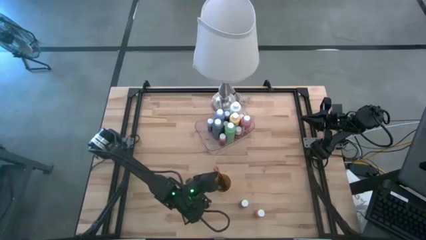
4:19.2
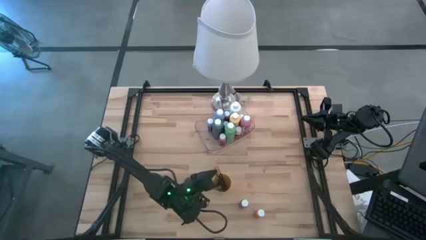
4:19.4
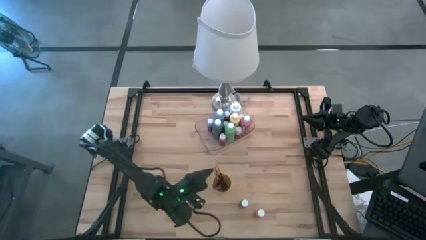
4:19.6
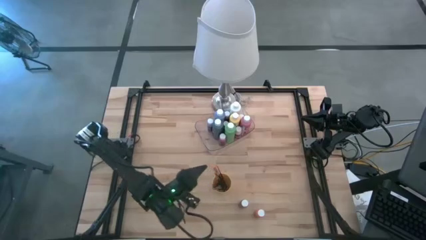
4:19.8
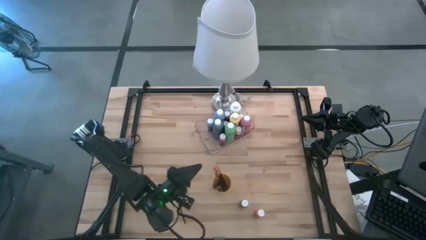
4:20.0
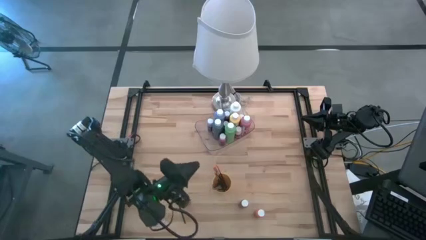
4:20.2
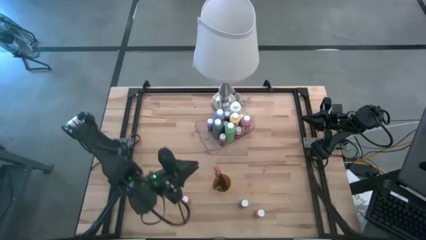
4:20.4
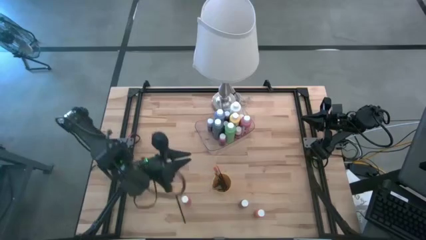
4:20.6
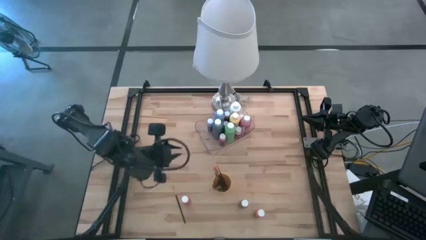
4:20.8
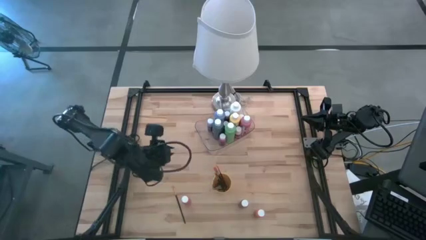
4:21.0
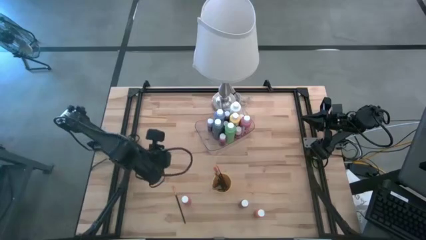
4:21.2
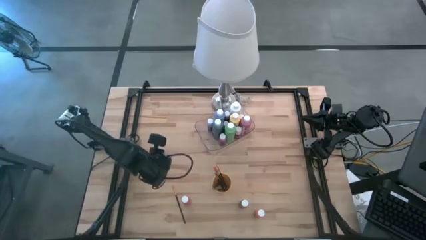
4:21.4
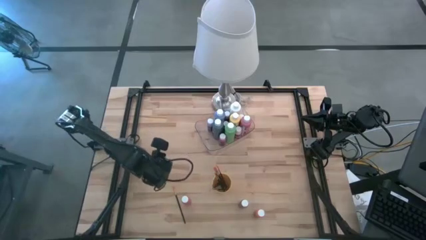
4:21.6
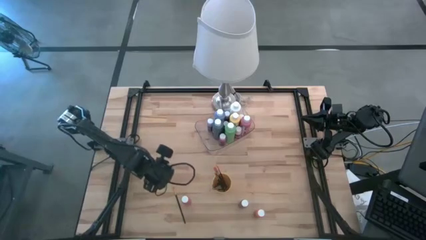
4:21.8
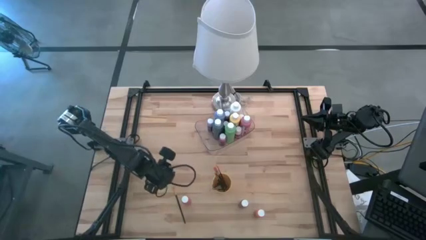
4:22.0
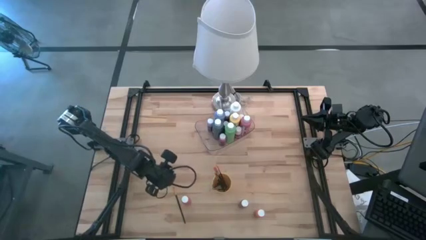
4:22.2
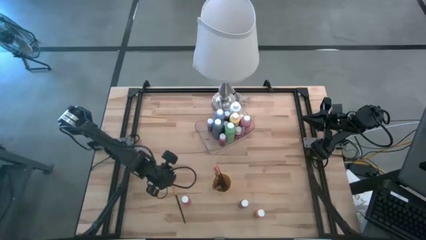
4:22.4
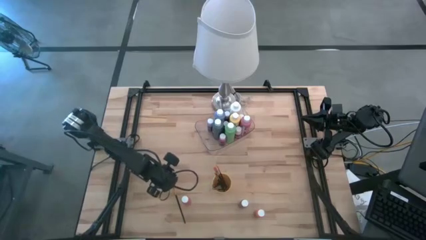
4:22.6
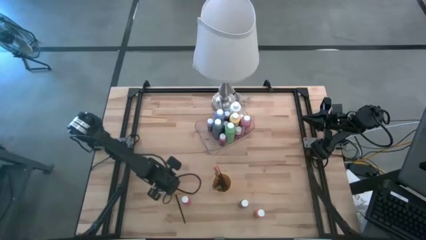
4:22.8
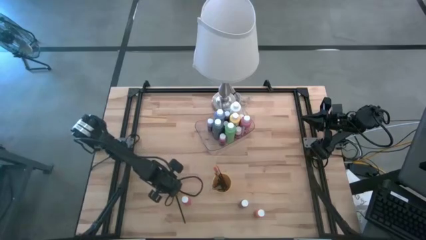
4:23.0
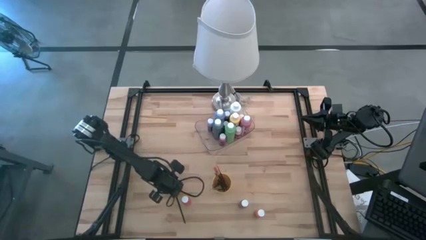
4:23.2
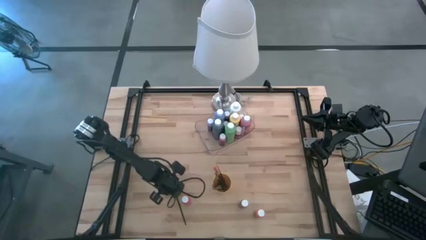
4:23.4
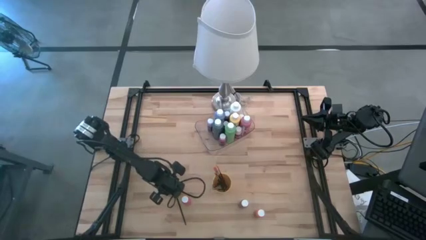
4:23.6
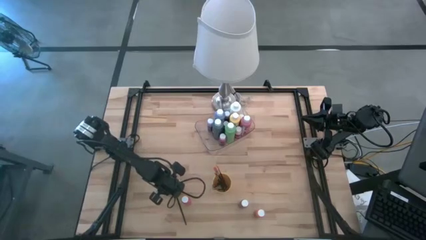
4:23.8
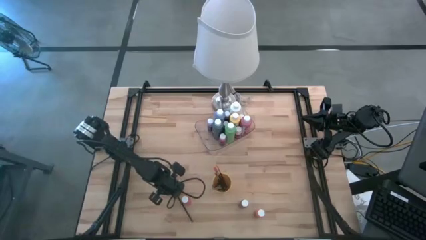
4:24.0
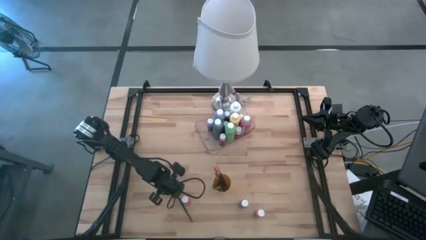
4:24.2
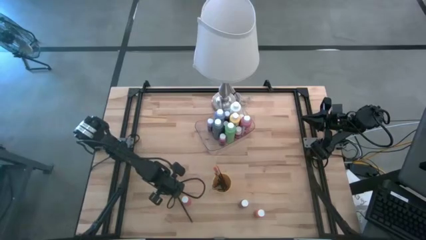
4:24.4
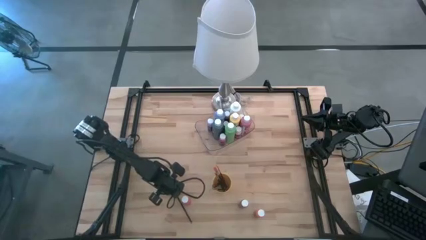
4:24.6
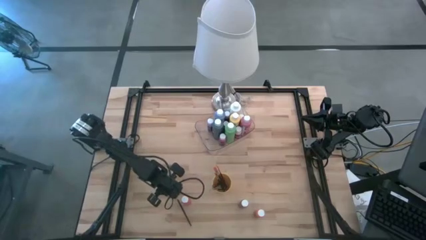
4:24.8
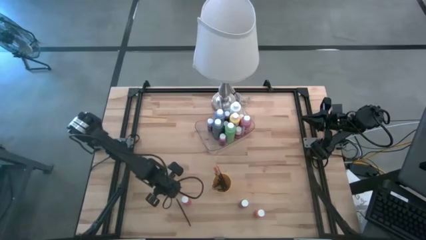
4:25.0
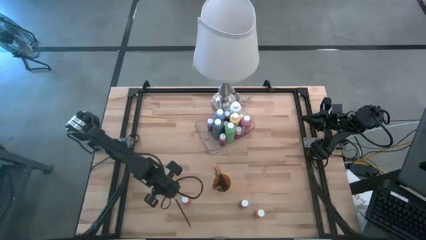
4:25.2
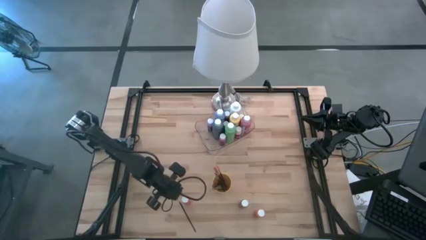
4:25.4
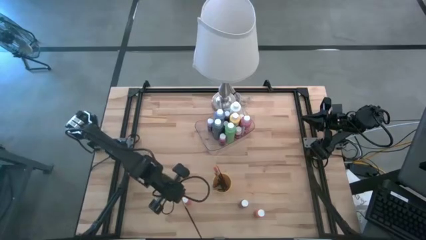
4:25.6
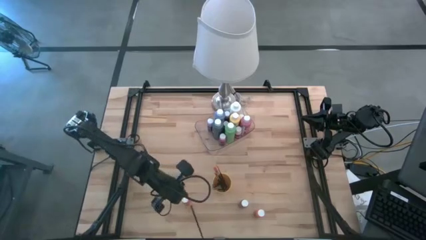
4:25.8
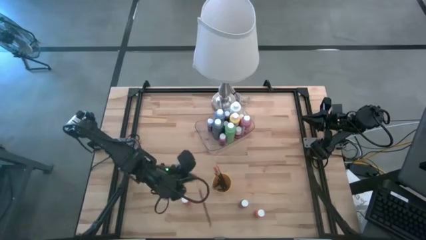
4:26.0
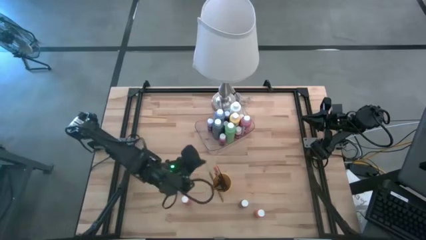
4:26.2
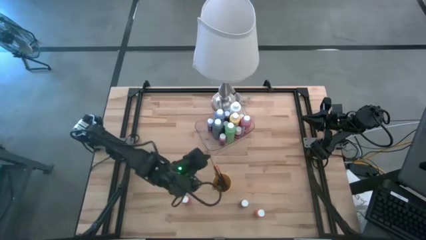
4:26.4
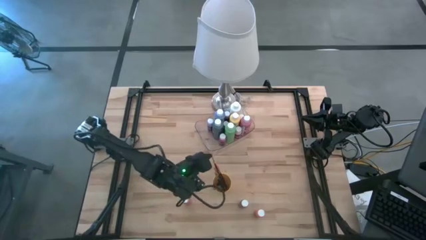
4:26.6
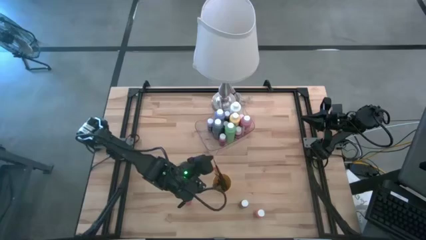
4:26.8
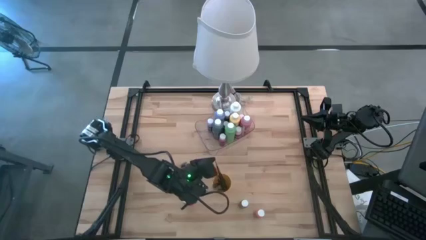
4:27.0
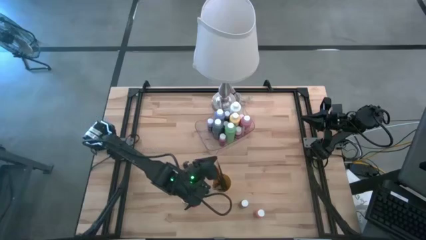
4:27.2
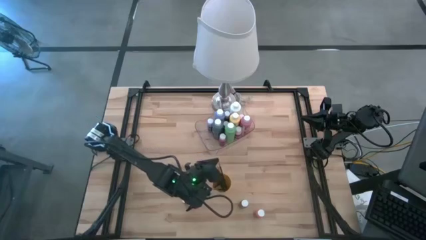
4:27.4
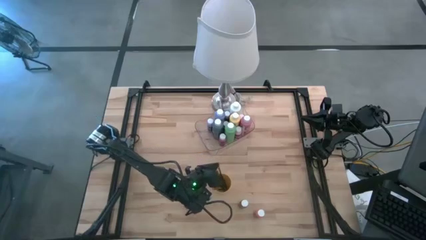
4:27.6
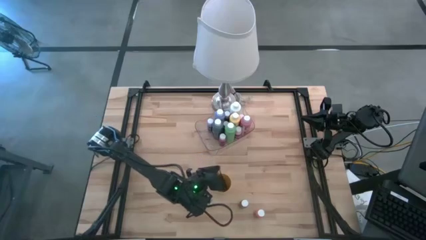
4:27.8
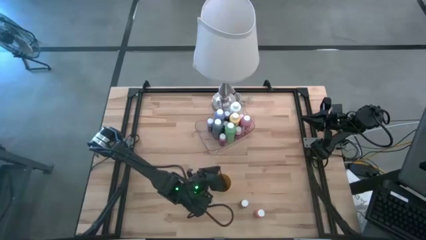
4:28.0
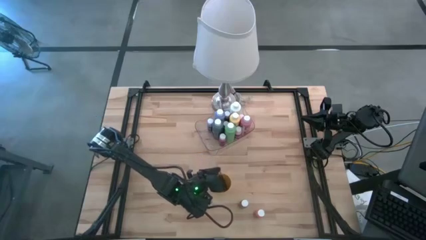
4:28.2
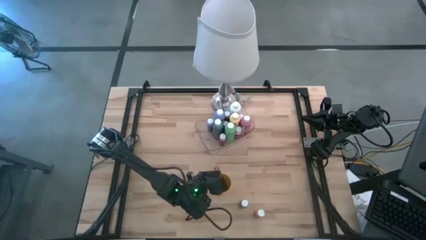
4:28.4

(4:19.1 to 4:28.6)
Task: Pick & Place Paint Supplies
Put the black paint brush into the yellow cup

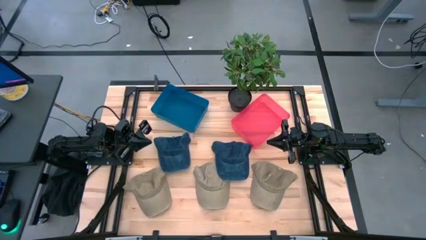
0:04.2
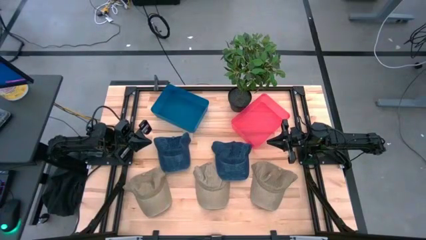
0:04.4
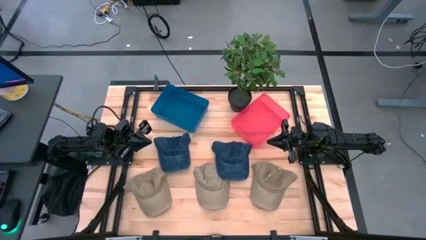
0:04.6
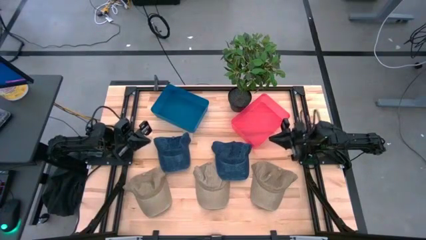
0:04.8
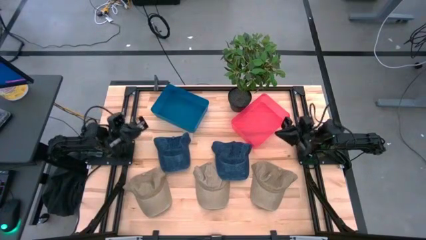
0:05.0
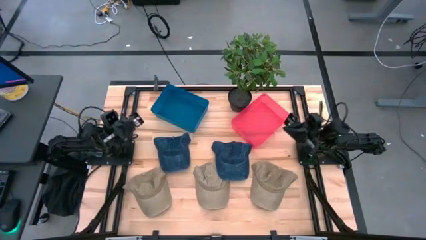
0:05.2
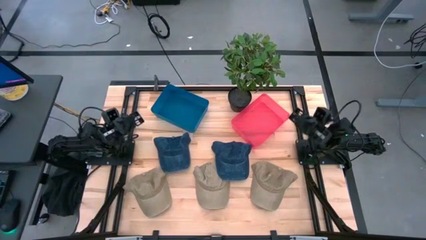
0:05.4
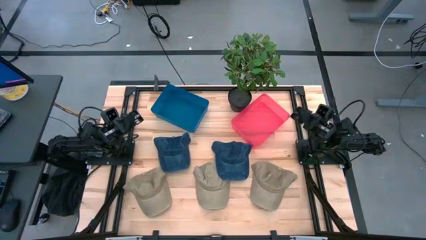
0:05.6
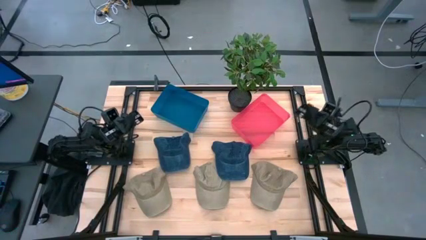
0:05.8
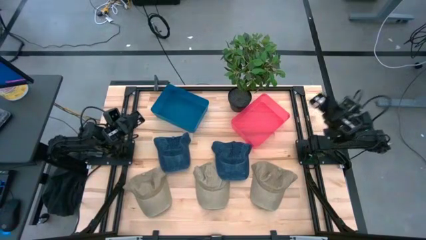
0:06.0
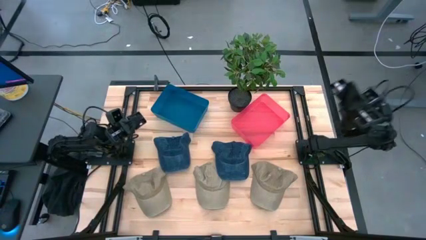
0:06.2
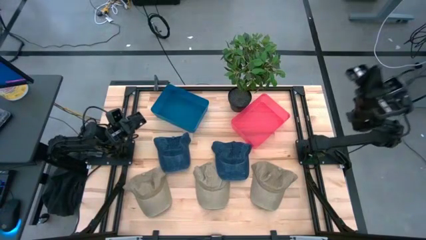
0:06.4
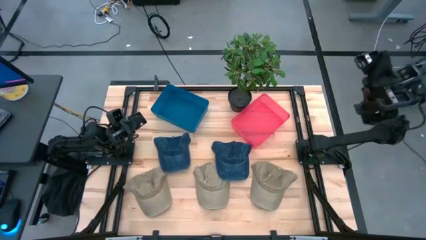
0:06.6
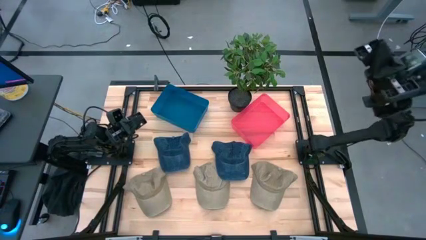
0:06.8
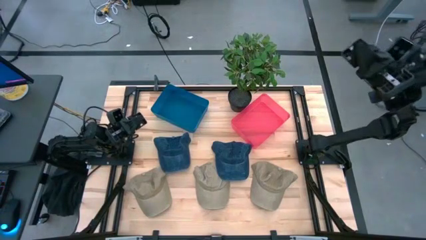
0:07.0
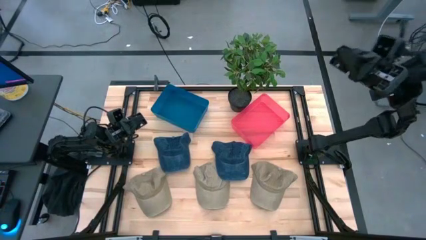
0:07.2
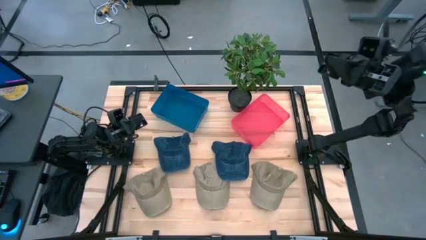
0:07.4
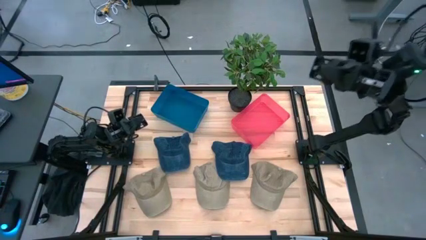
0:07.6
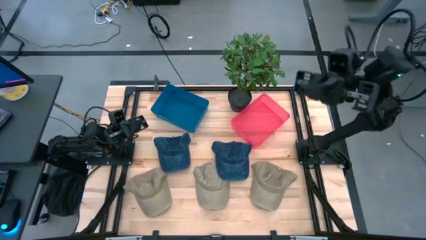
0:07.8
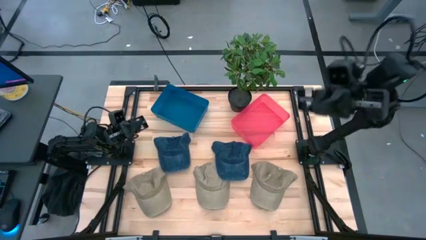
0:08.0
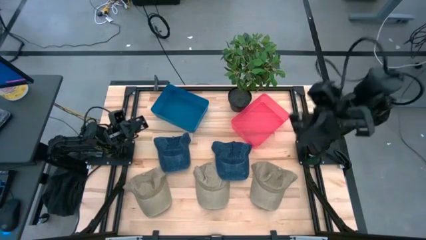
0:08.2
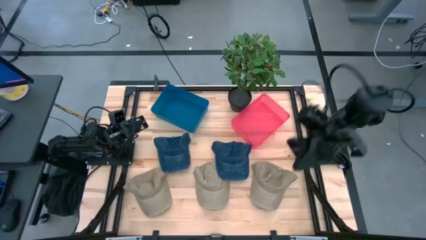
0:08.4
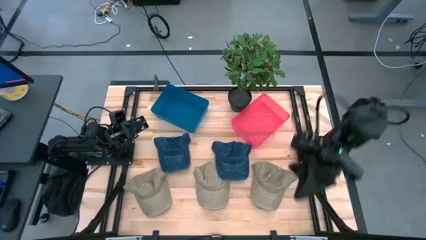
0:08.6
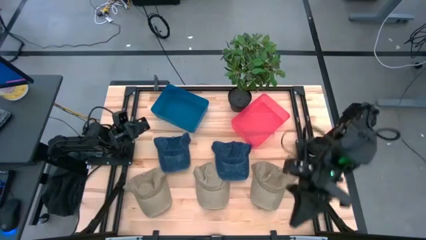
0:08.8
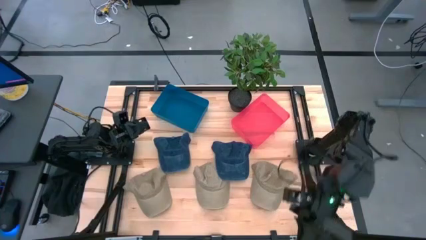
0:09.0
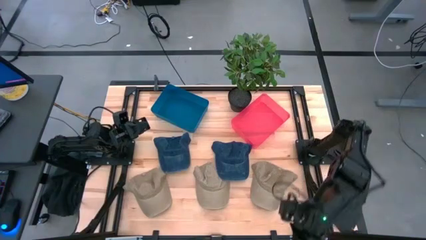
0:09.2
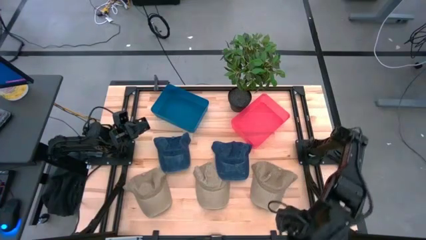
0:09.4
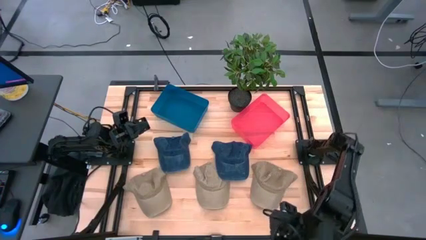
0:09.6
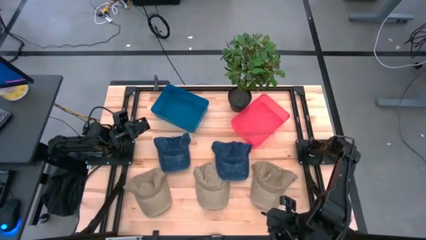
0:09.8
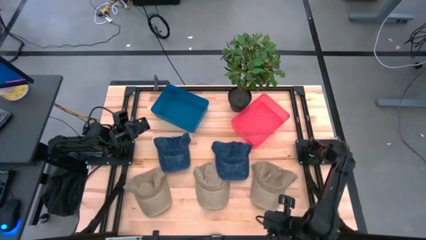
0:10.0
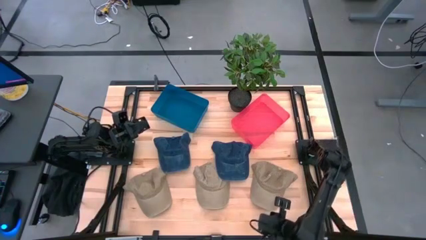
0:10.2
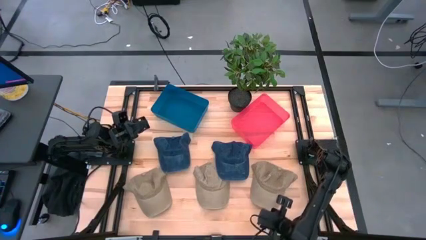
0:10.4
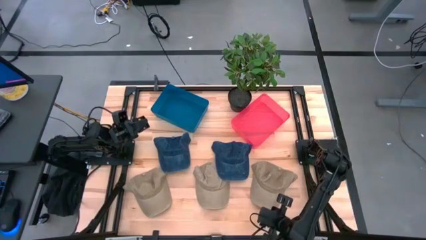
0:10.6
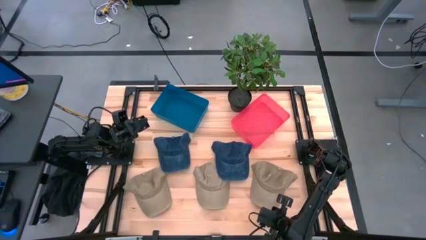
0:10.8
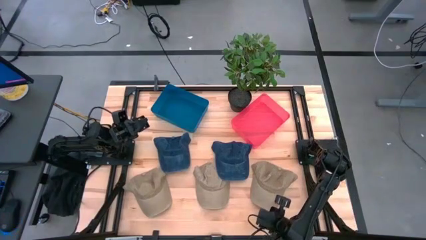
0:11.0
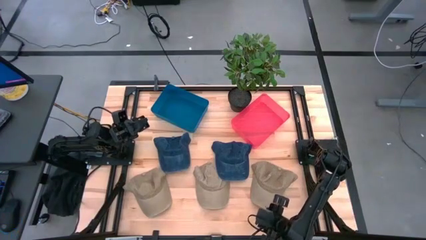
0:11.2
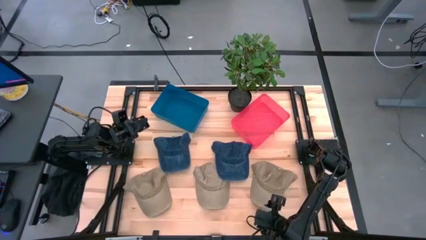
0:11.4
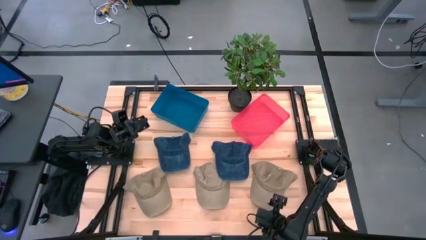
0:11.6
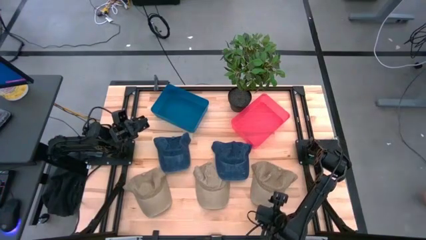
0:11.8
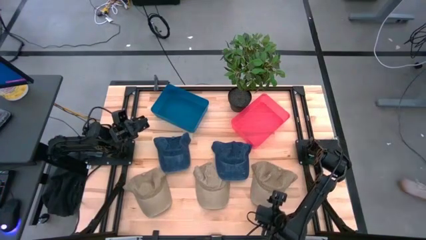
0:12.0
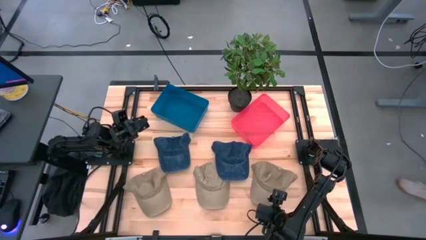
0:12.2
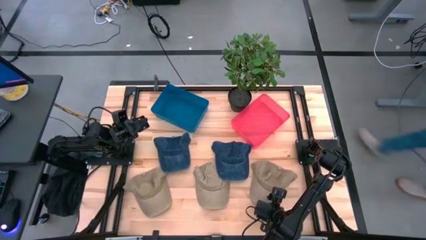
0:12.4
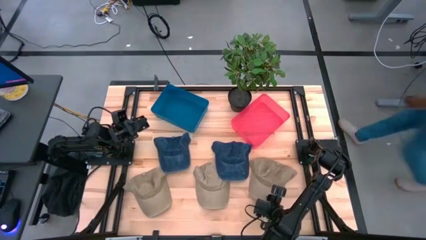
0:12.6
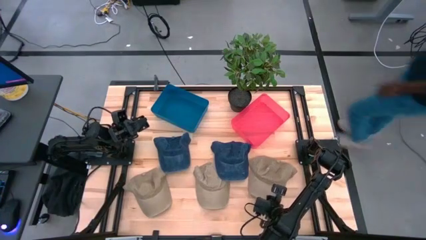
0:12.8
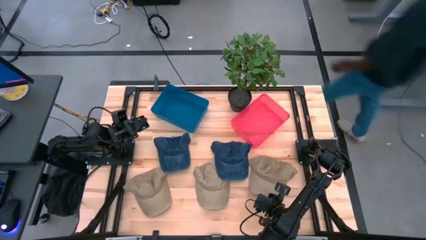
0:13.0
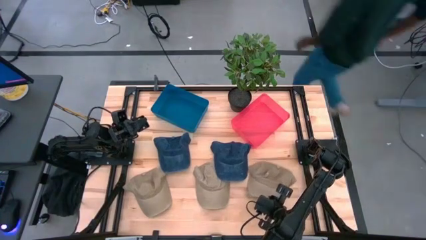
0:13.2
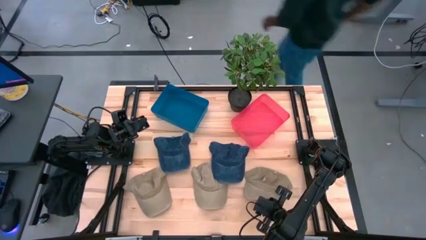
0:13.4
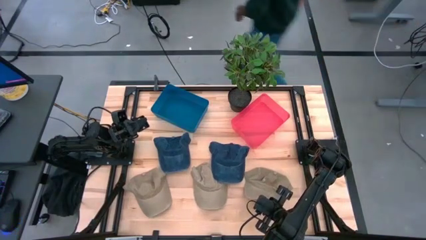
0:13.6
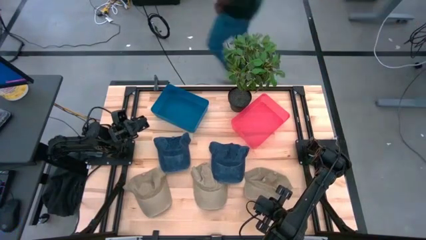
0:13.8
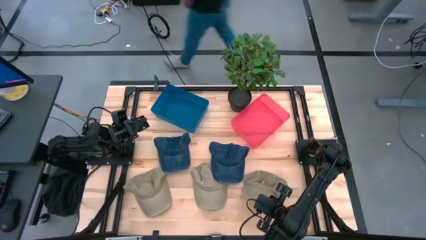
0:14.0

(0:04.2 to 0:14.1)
Task: Pick & Place hat
Put the right brown cap into the red bin
